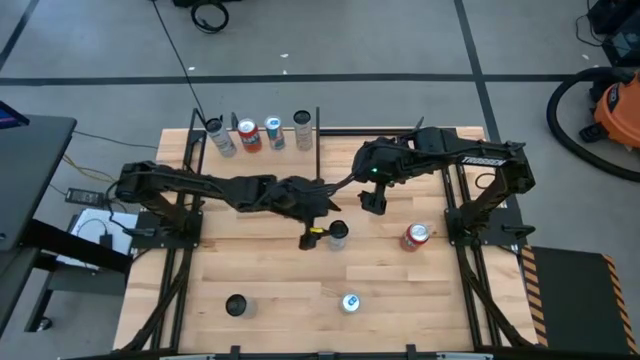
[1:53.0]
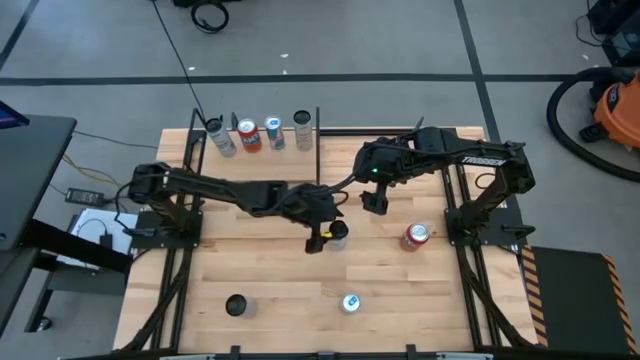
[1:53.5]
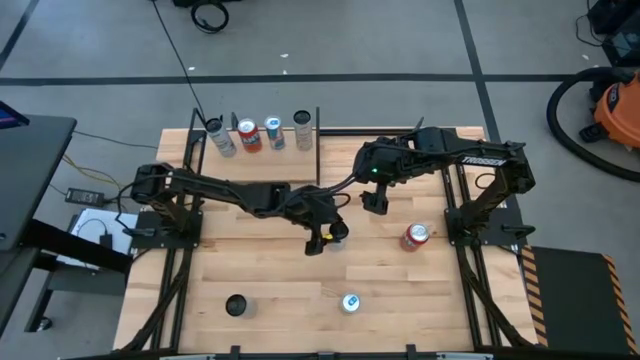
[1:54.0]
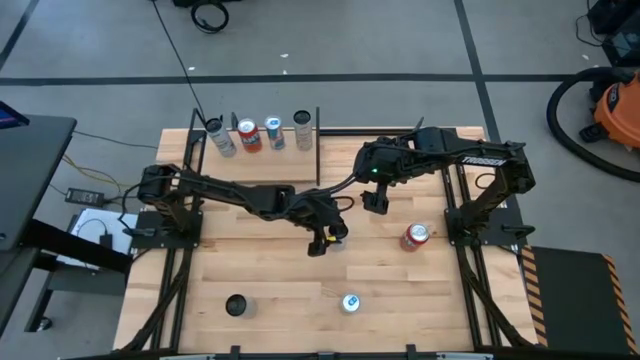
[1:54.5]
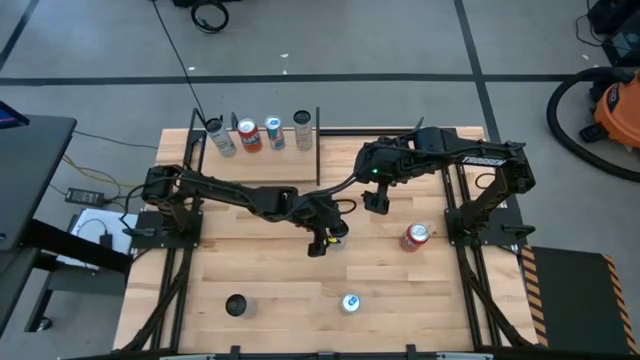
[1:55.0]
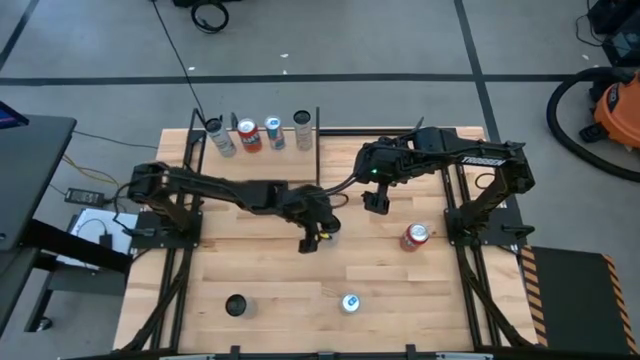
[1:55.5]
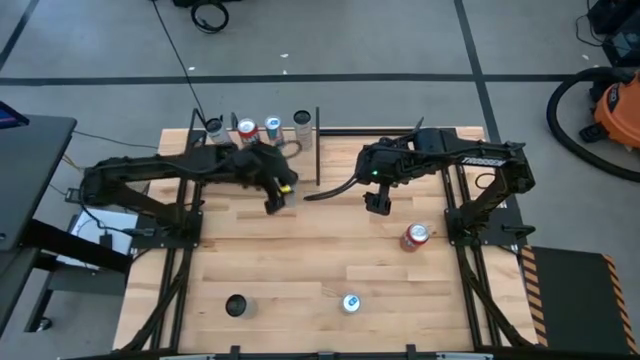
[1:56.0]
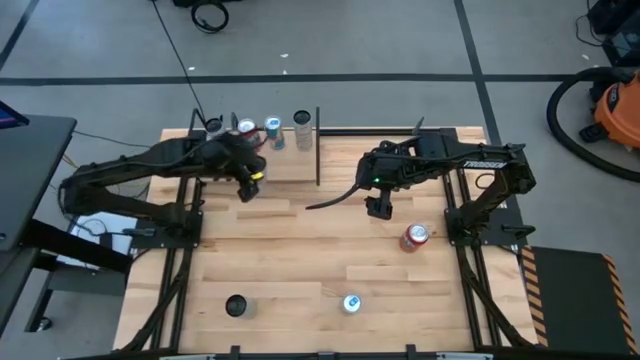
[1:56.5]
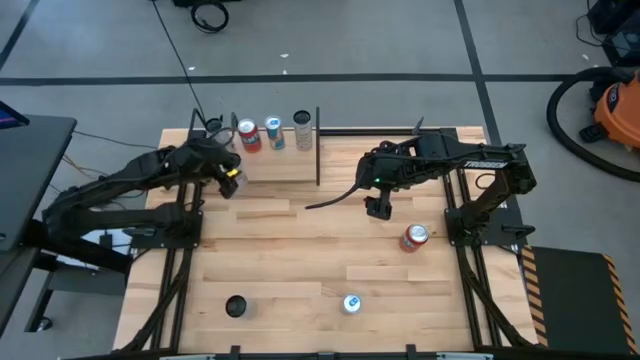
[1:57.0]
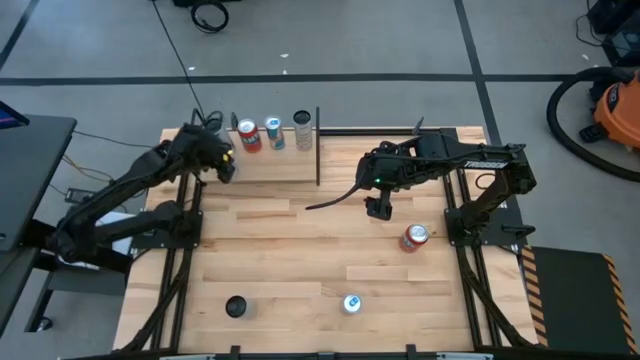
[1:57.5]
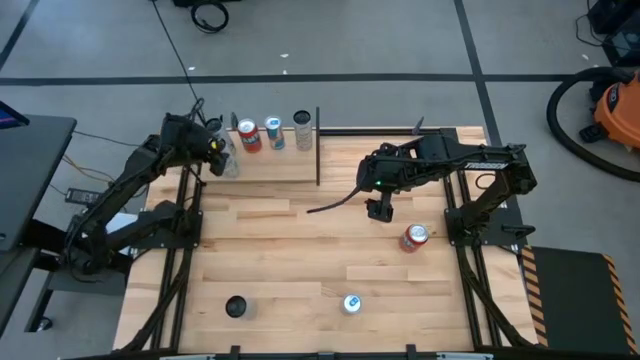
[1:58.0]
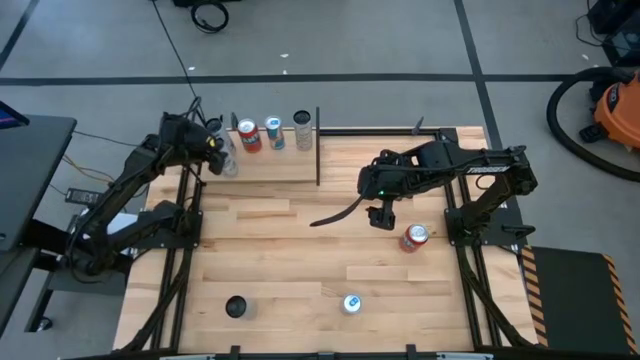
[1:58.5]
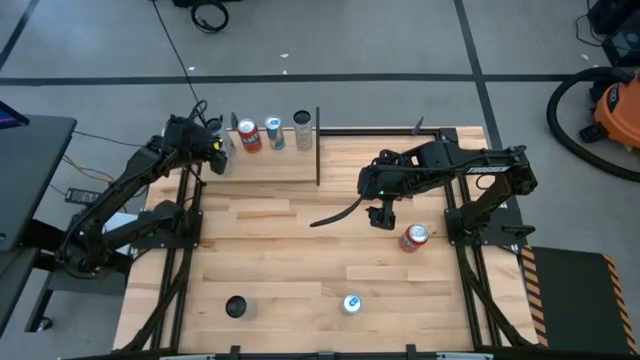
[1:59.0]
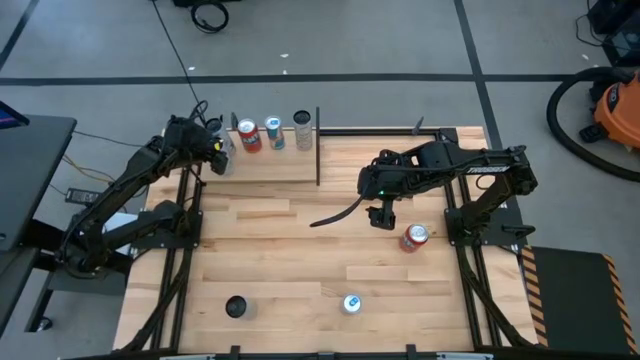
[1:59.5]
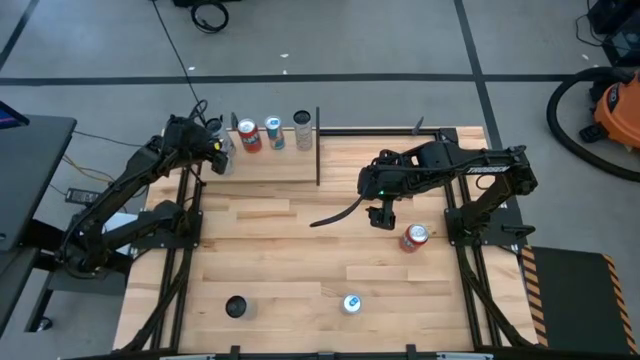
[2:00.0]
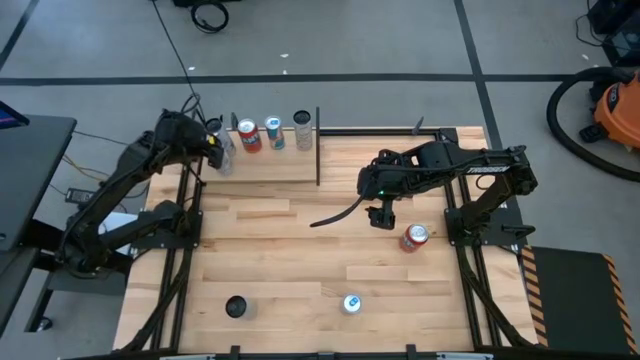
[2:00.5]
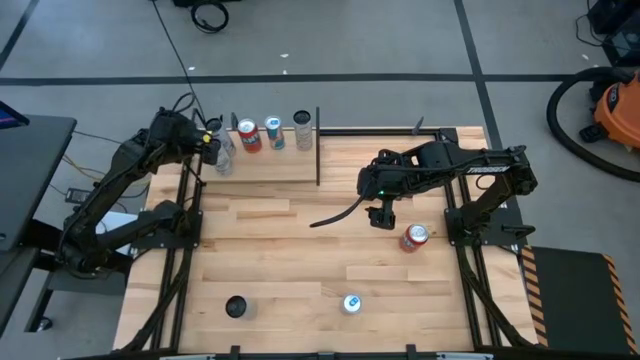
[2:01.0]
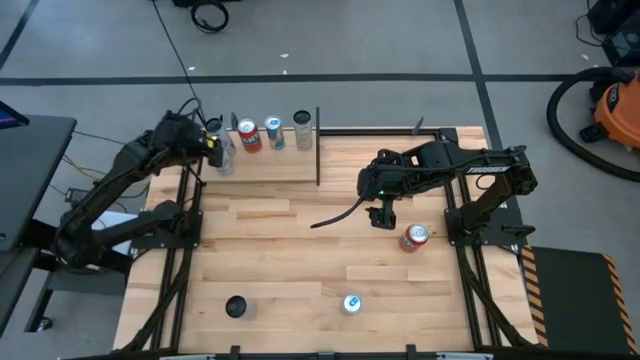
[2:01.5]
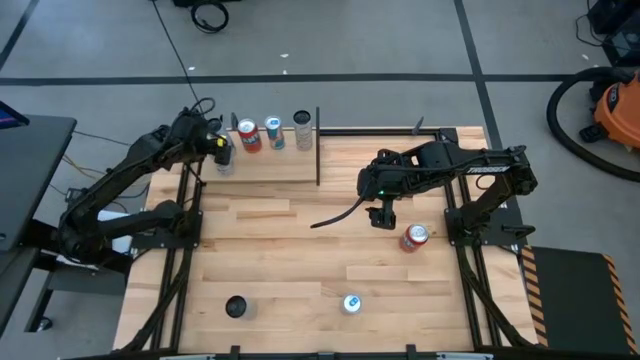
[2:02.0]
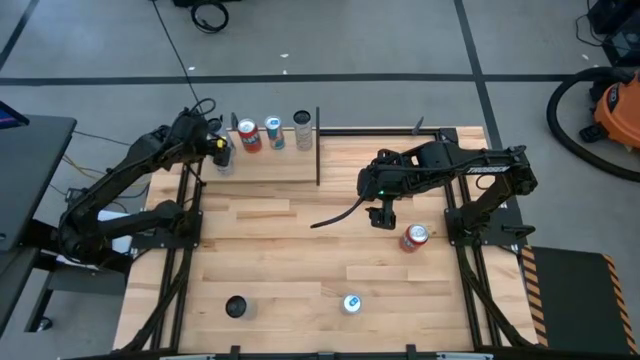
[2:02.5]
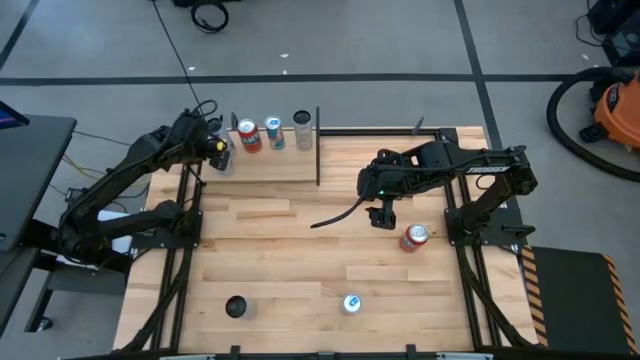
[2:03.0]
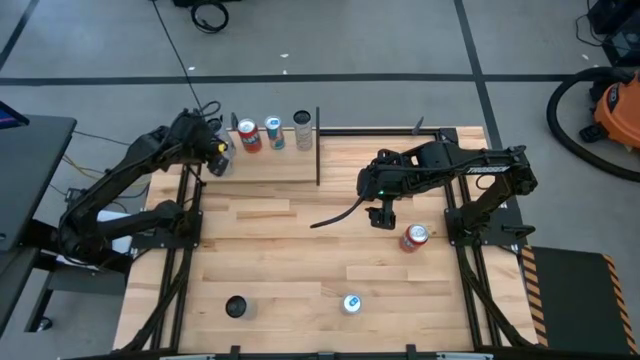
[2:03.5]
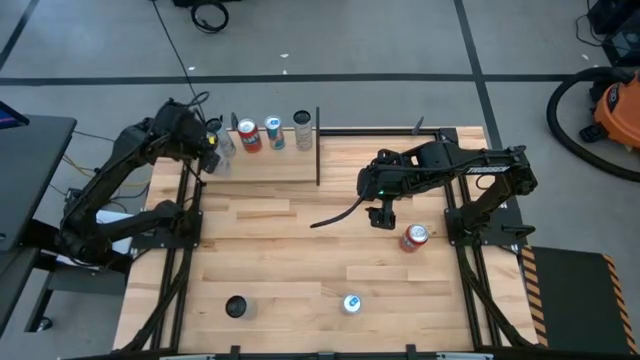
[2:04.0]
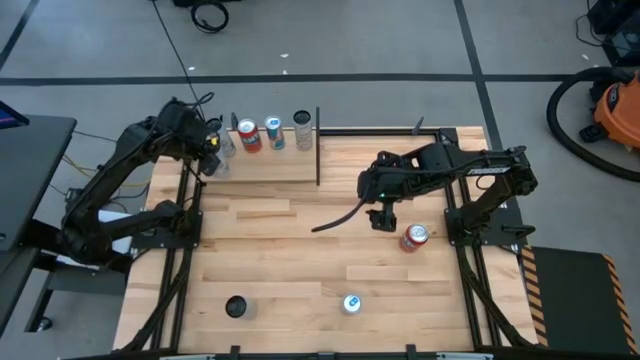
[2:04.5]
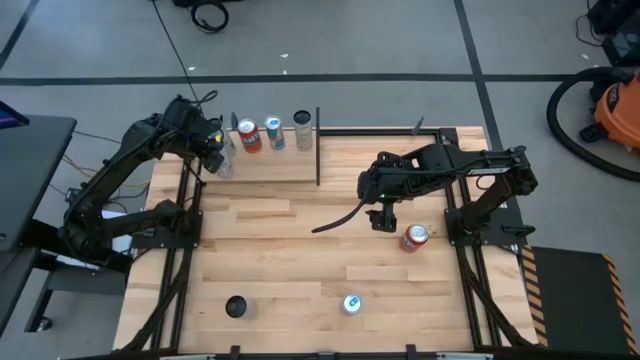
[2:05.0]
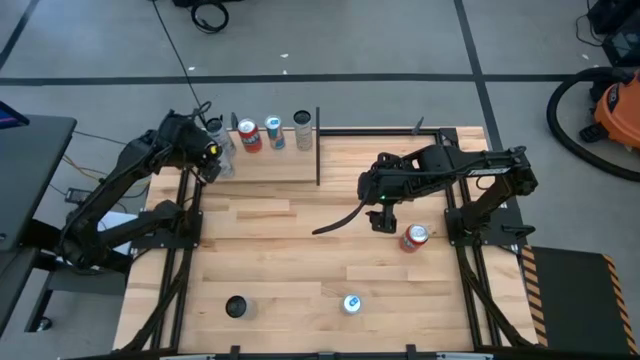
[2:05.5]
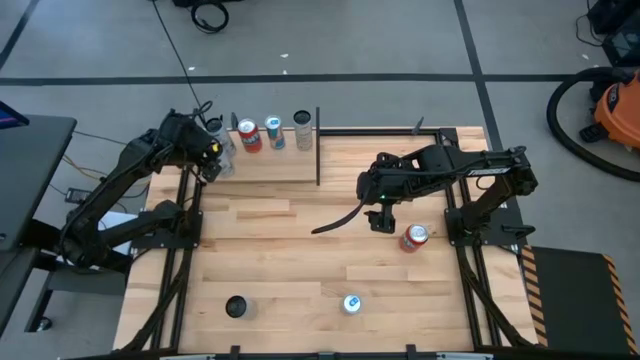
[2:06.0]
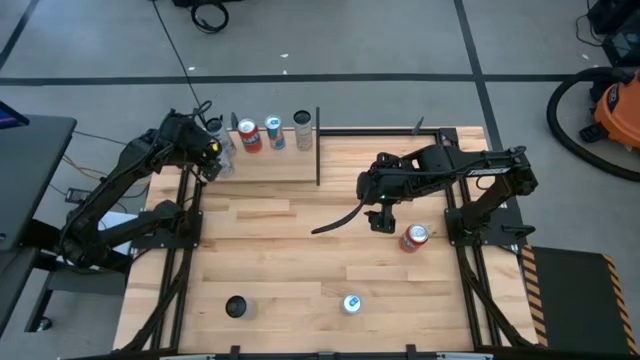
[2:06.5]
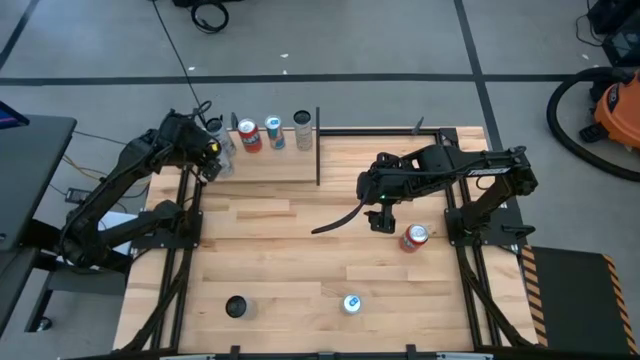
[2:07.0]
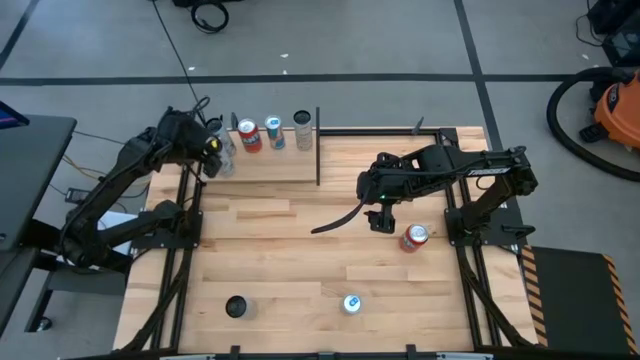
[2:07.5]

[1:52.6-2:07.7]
Task: Place canned beverage on shelf
Put the white blue soda can aligned with the other white blue soda can on the shelf

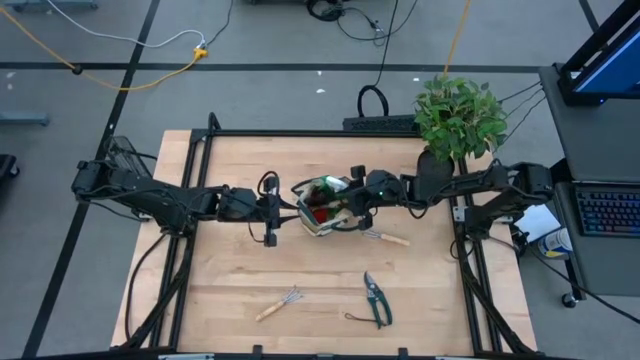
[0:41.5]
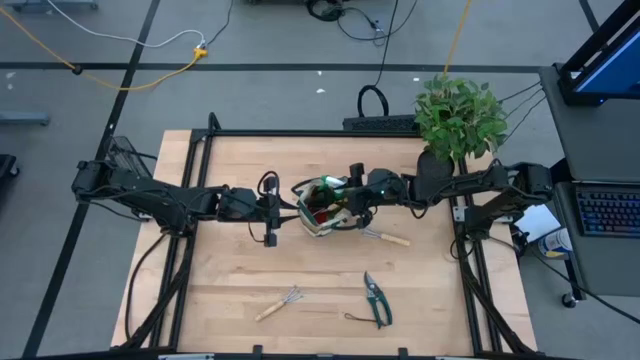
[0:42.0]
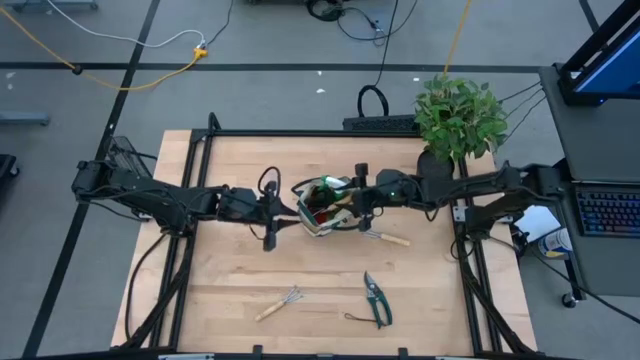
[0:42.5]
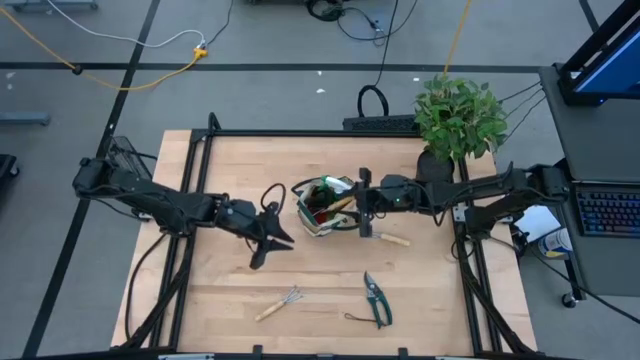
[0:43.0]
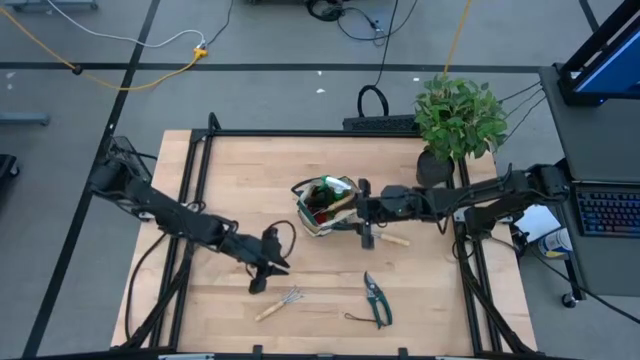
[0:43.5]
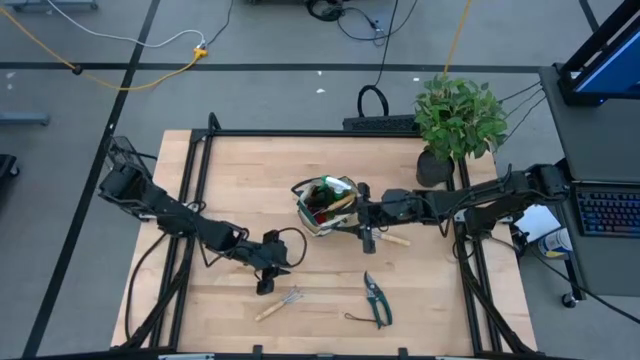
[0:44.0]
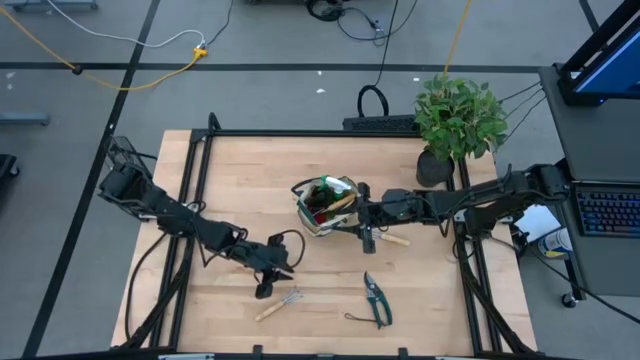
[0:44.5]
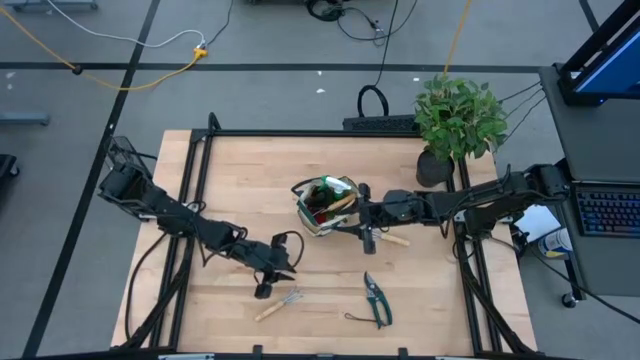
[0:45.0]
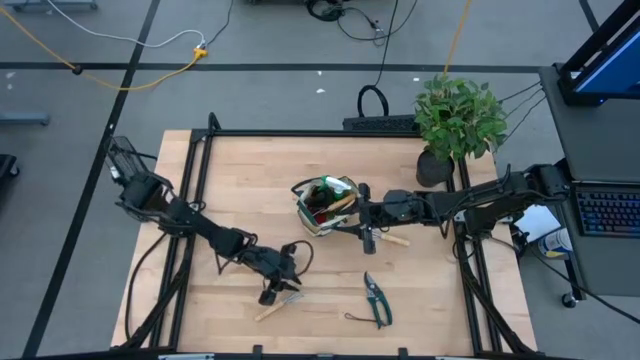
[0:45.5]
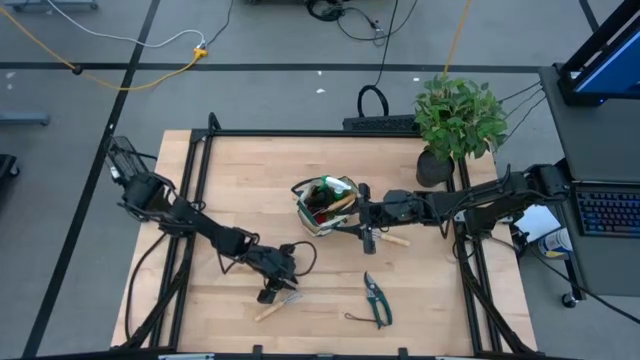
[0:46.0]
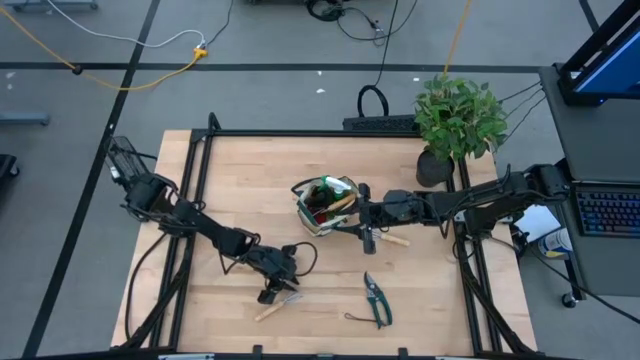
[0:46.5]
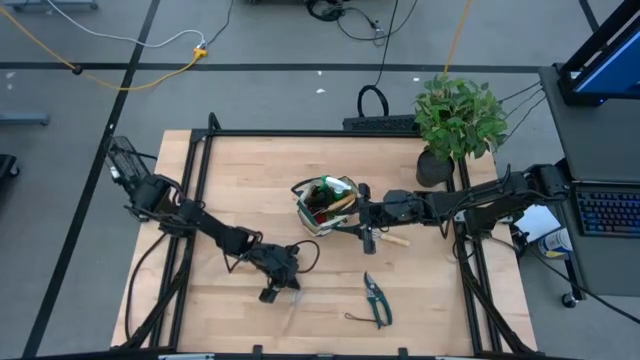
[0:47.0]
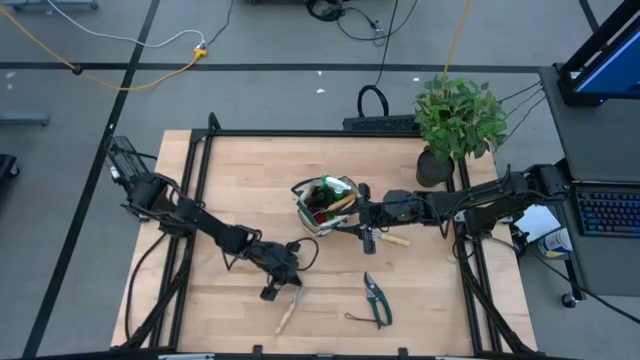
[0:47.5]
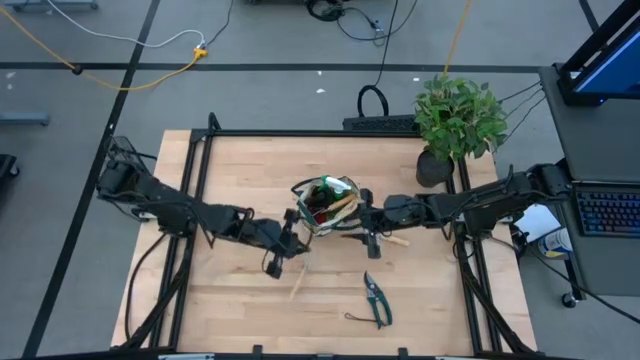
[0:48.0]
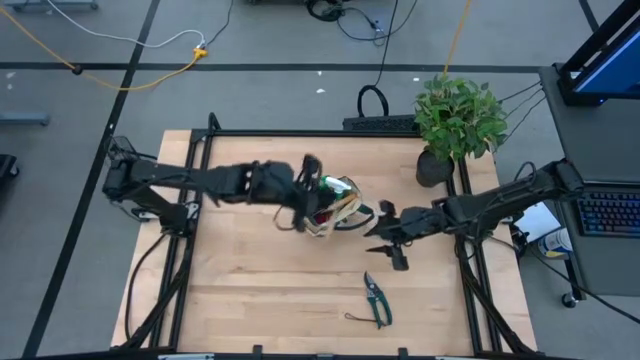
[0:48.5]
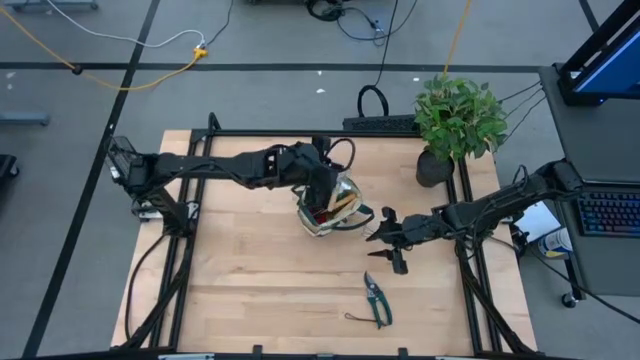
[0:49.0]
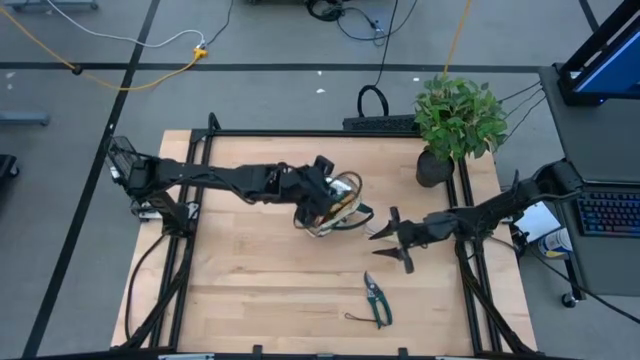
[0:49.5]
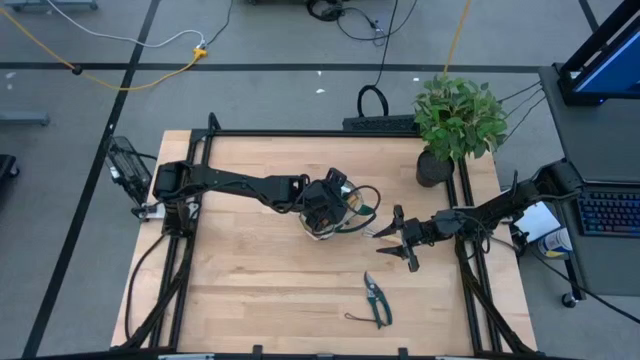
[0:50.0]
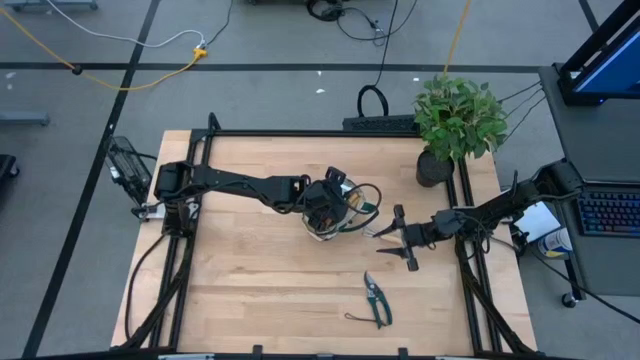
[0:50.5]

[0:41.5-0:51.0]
Task: Pick & Place Garden tools in Gardening bag
Put the left brown hand rake into the green gardening bag
